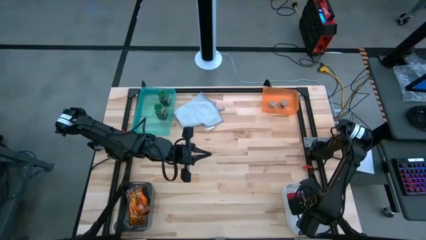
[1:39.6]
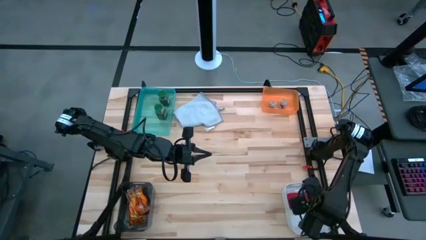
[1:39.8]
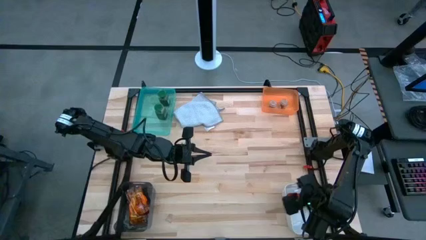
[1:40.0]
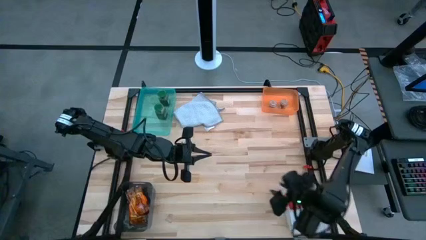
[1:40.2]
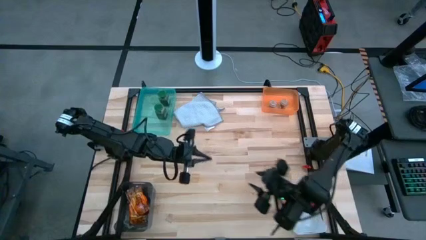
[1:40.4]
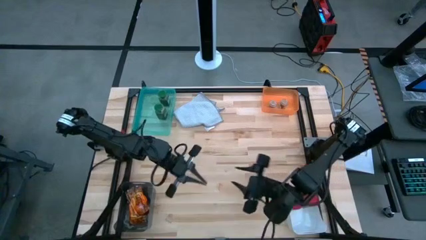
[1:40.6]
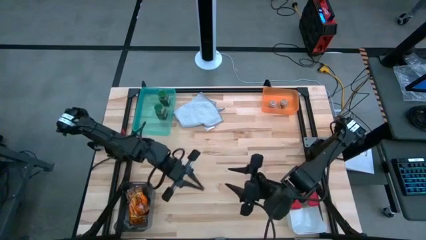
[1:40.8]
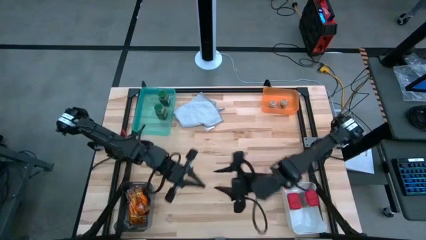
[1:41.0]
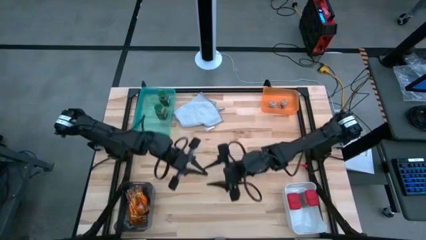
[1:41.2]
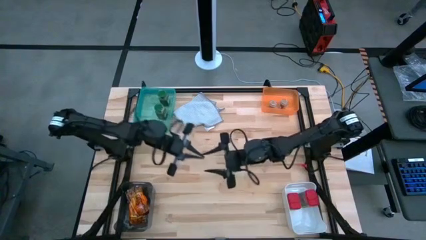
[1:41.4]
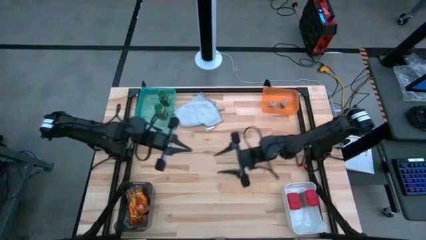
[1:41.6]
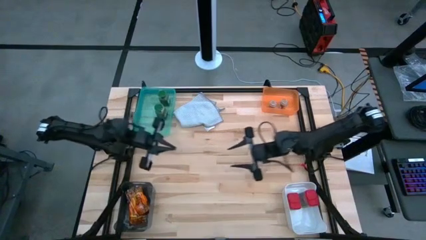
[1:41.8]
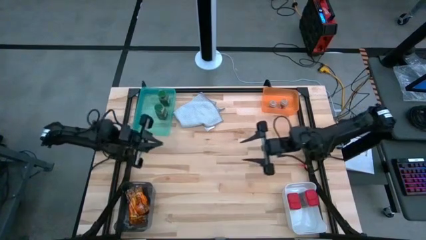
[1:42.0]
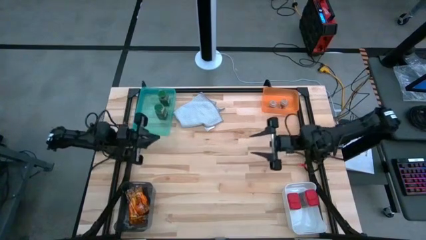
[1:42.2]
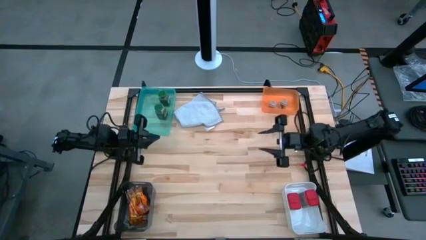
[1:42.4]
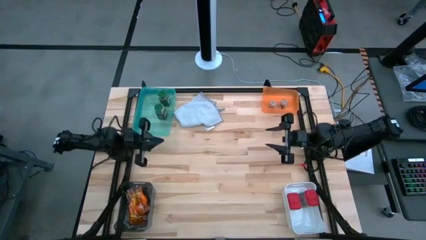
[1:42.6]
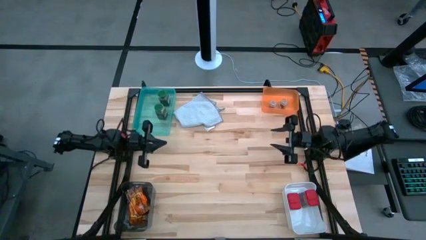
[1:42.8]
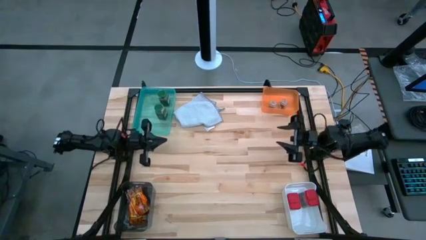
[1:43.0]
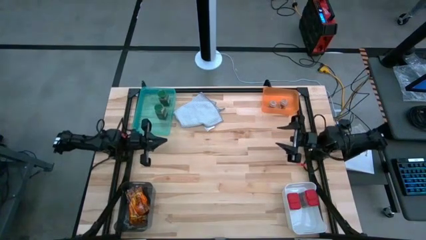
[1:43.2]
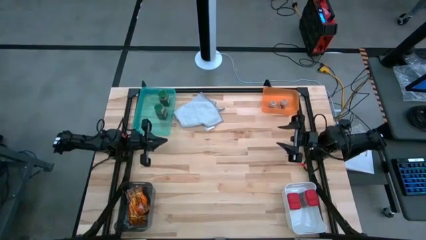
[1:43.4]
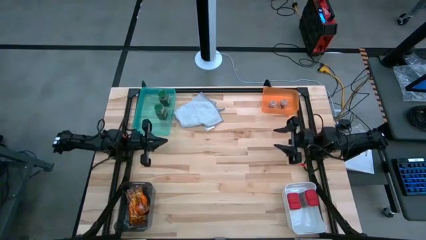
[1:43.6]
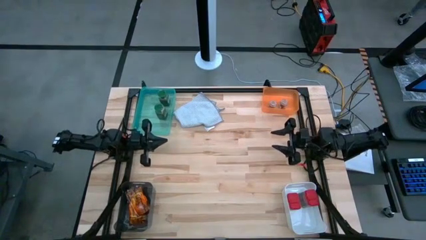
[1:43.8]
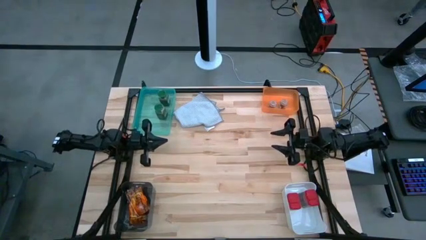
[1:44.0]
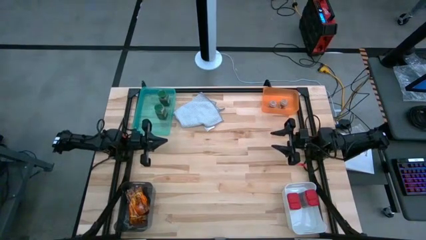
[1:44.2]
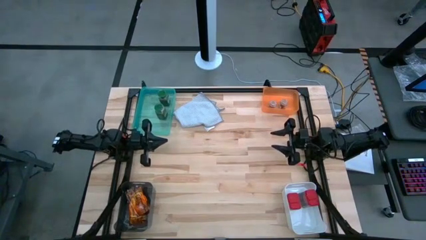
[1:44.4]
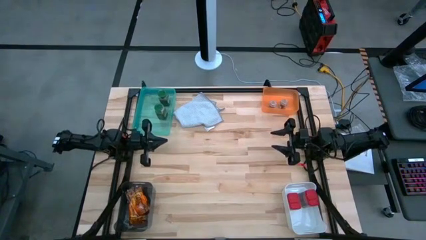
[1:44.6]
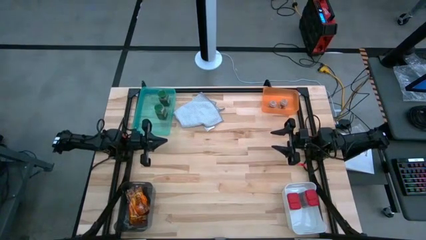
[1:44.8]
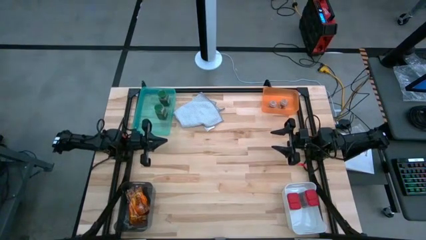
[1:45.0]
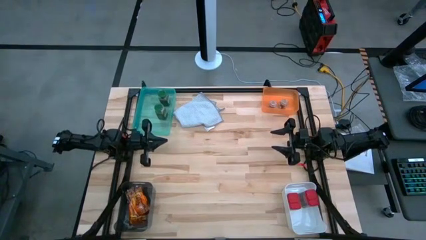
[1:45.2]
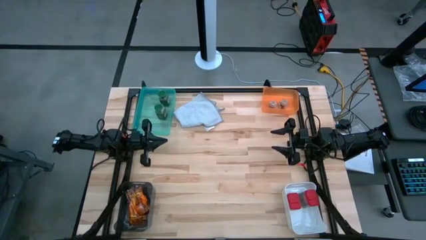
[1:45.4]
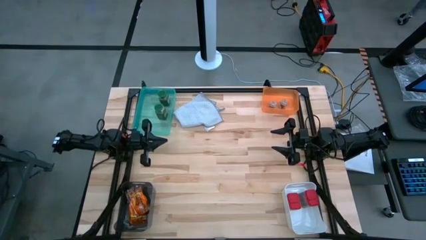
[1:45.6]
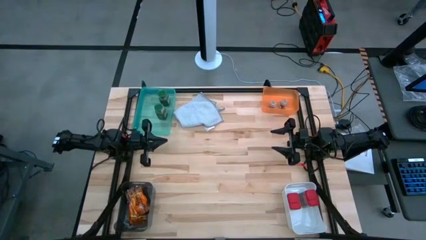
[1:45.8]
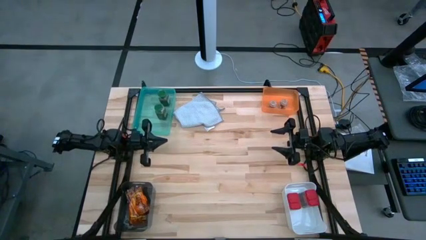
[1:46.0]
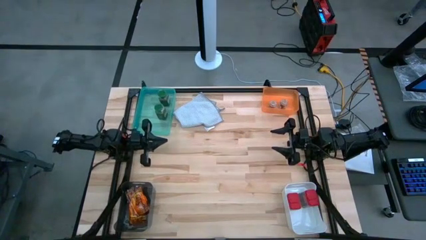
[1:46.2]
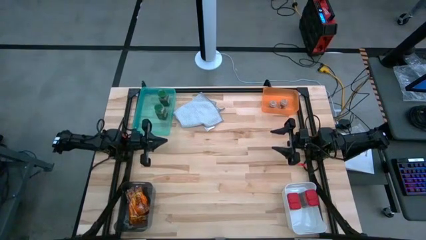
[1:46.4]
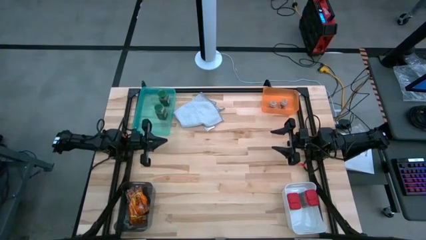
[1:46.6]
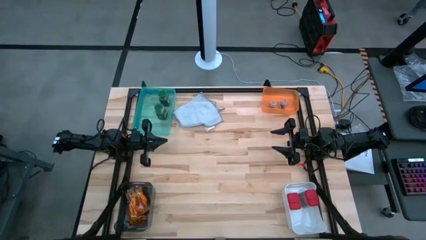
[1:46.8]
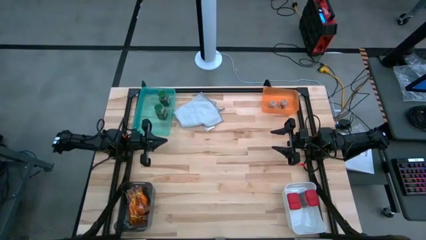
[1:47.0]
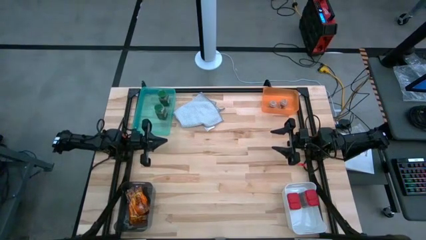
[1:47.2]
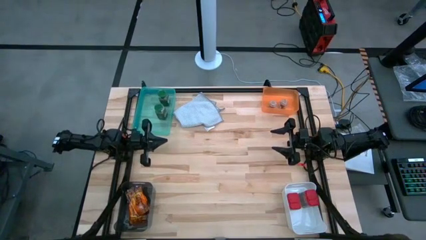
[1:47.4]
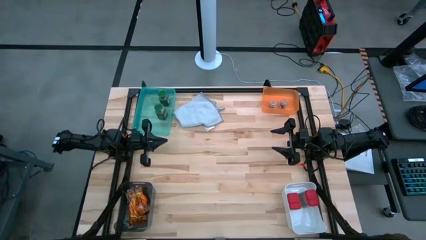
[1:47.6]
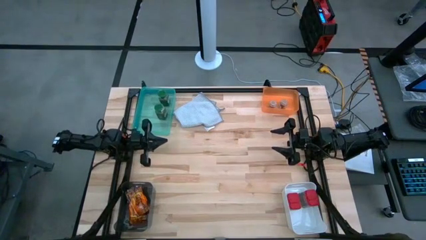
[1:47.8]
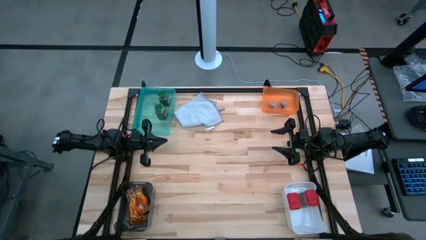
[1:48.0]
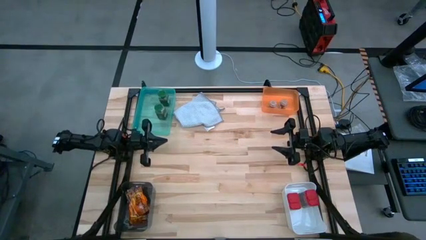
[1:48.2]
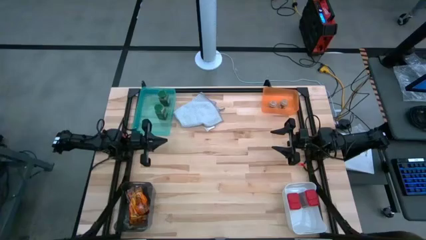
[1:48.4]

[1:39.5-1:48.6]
Task: Sort spices by type
Return to Home Position
